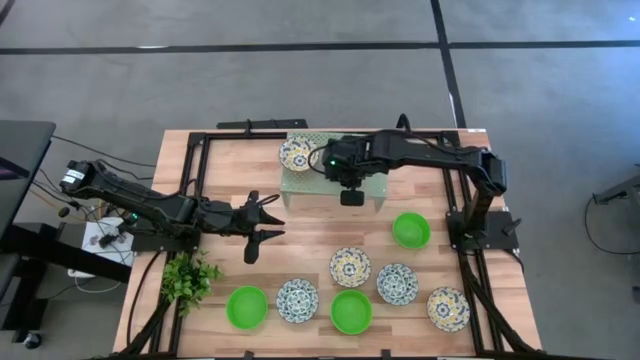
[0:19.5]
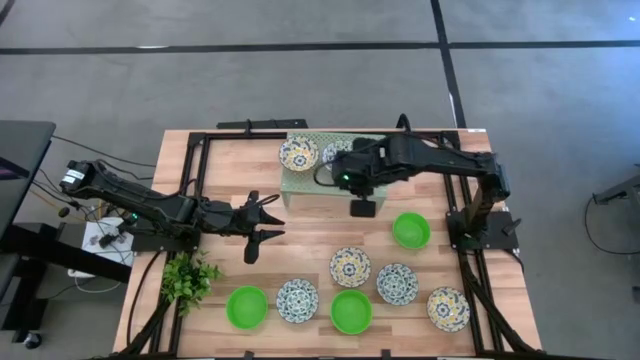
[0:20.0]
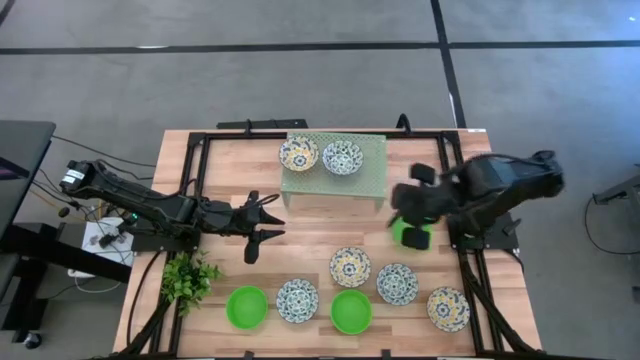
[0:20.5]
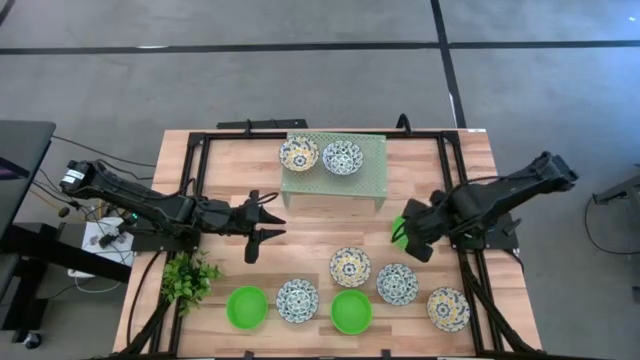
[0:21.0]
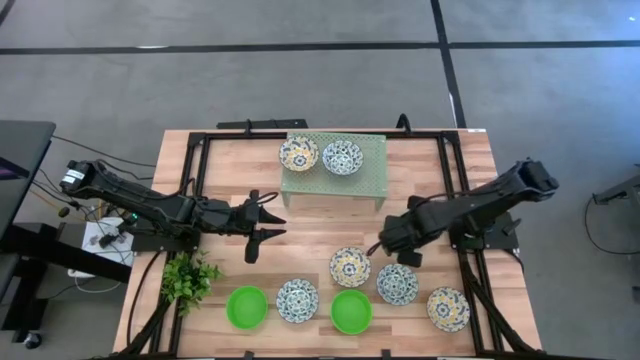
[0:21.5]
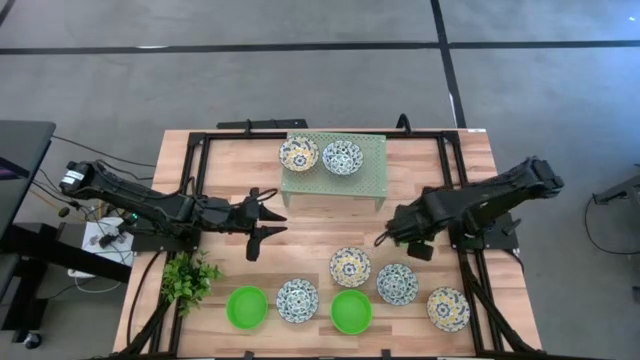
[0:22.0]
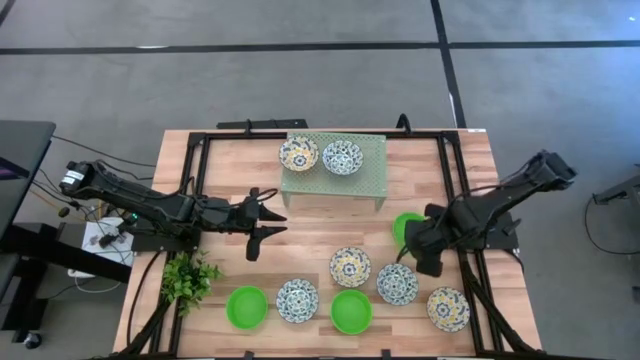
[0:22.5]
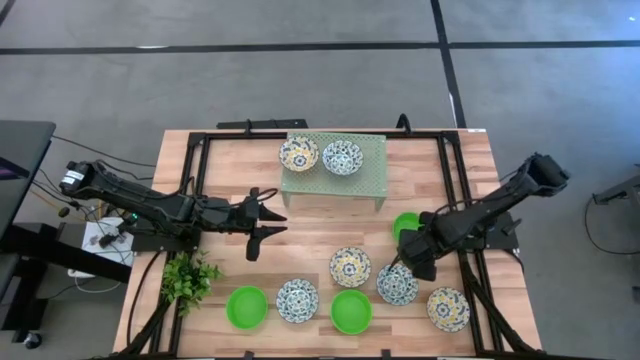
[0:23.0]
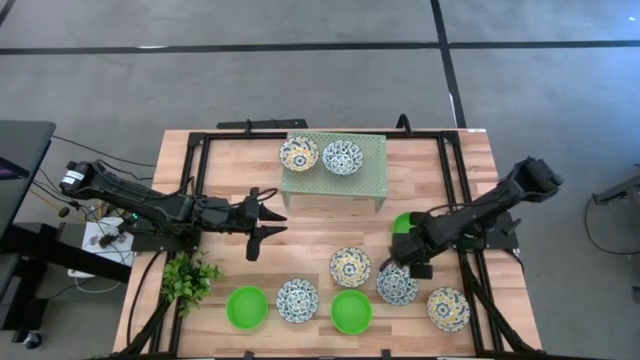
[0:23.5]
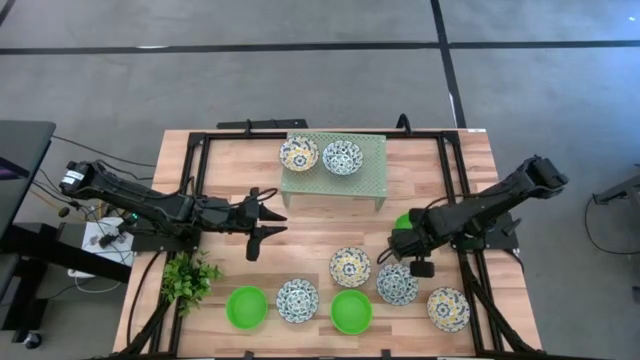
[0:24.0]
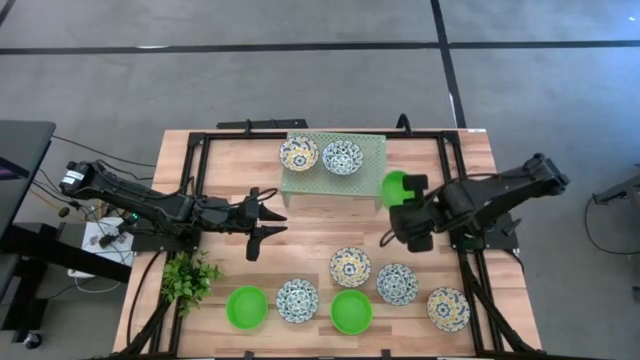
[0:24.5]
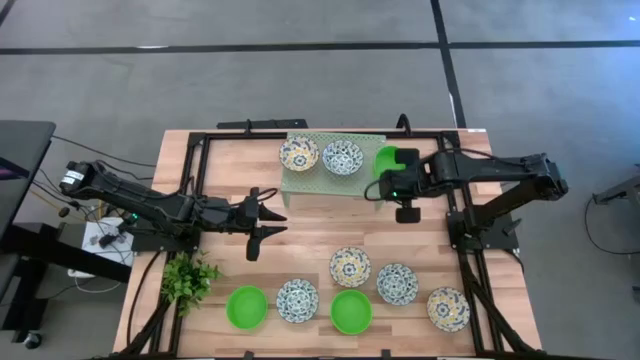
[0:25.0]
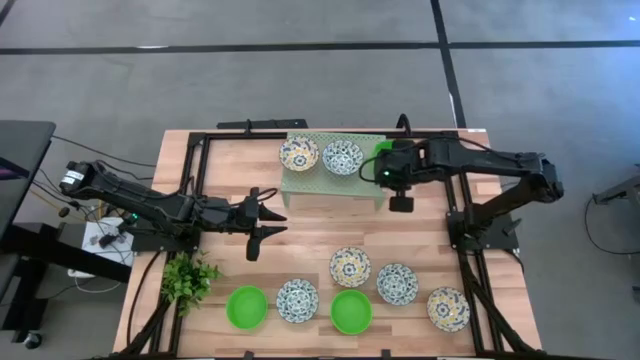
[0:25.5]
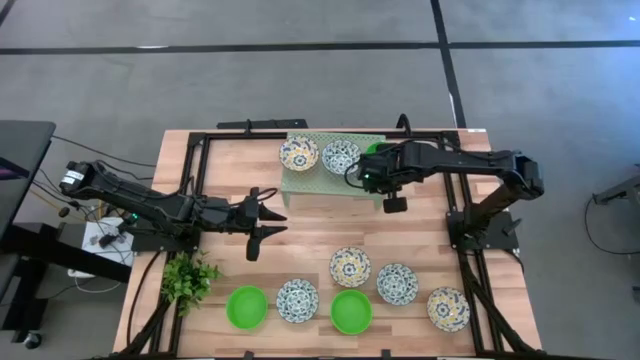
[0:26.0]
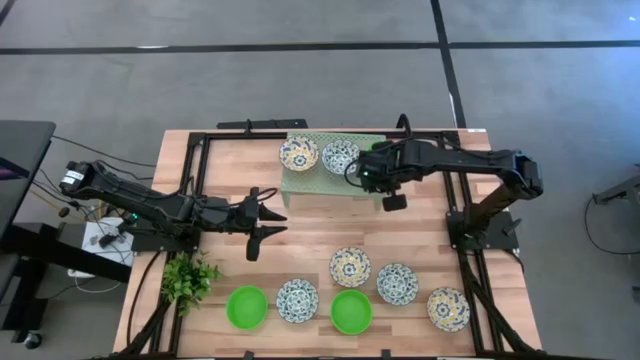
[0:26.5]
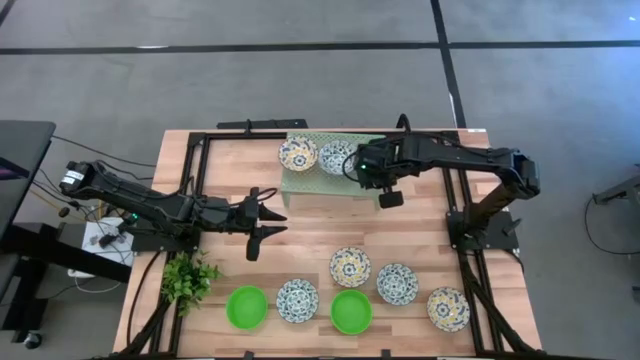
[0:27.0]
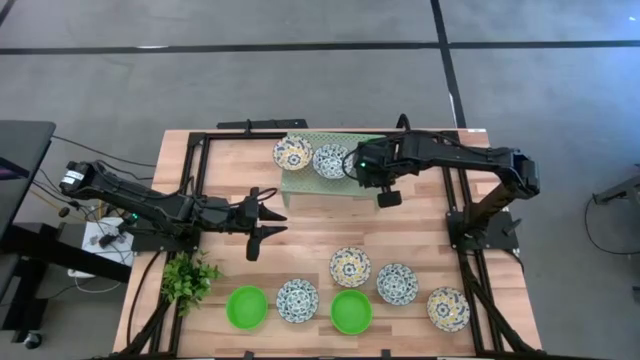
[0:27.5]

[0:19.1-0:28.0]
Task: Pick & Place Mini bowls
Put the top green bowl on the shelf

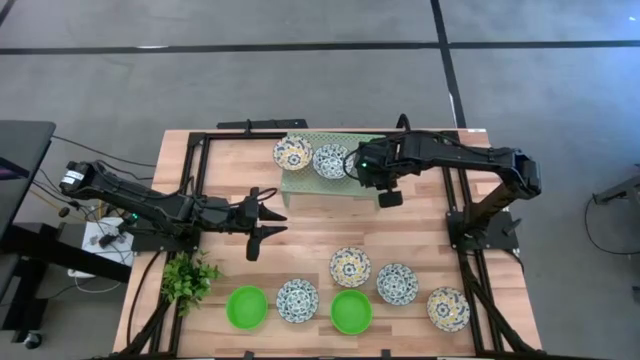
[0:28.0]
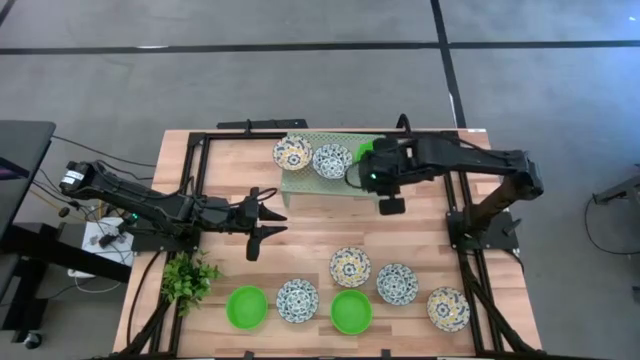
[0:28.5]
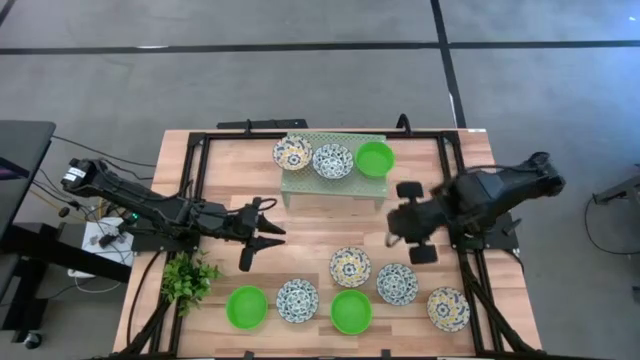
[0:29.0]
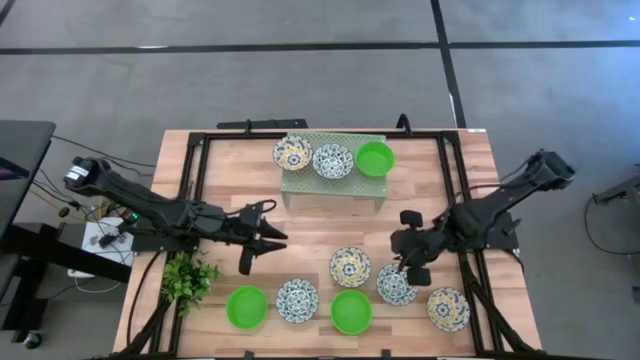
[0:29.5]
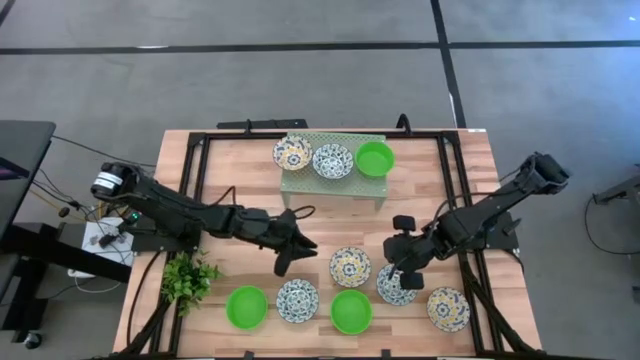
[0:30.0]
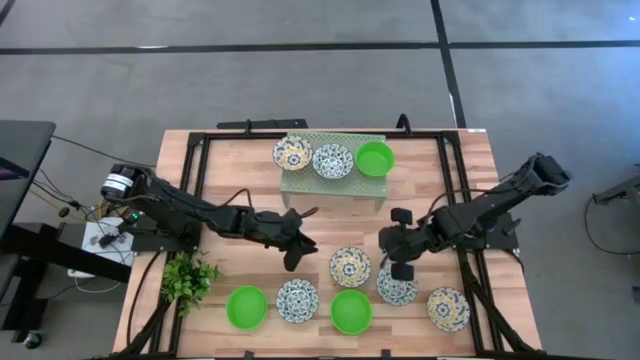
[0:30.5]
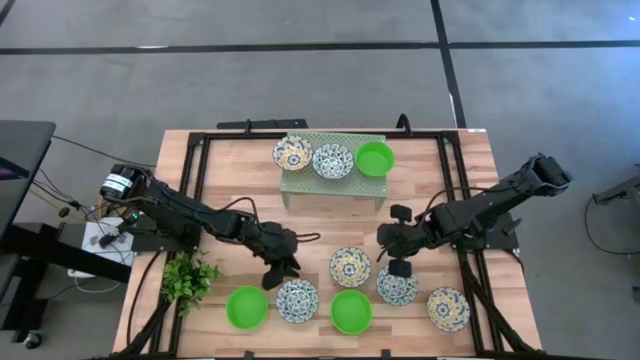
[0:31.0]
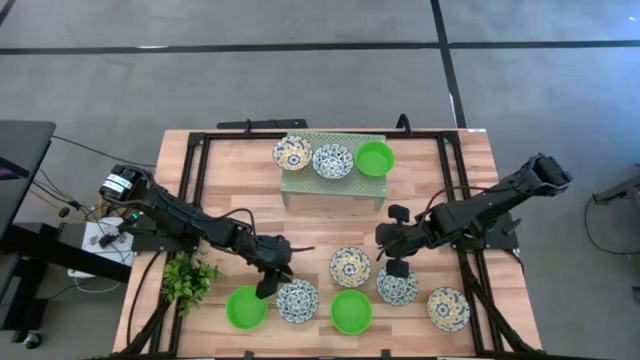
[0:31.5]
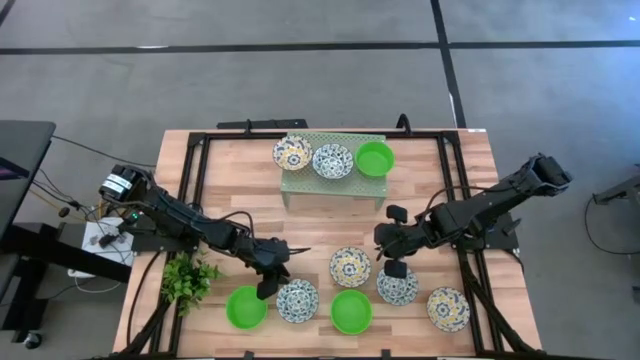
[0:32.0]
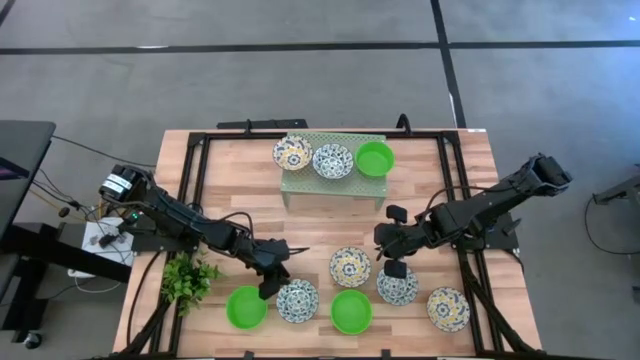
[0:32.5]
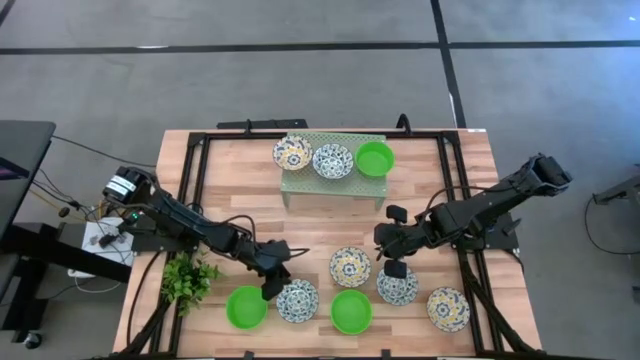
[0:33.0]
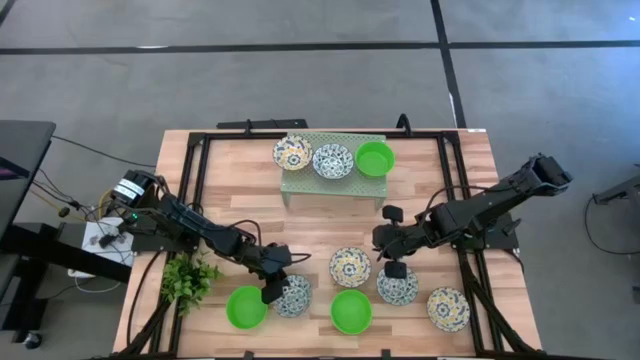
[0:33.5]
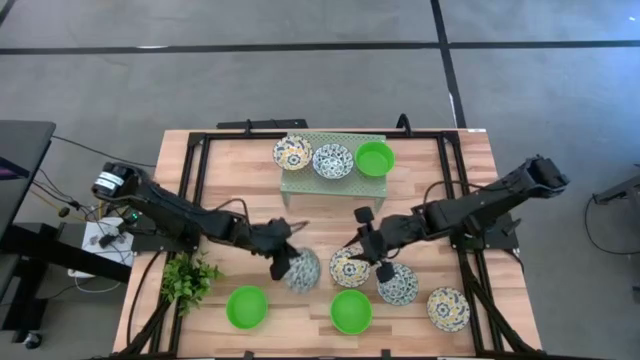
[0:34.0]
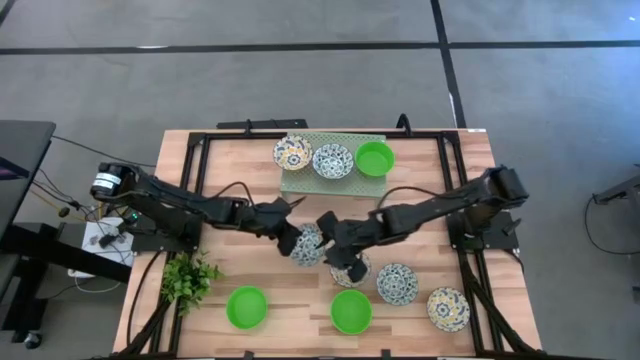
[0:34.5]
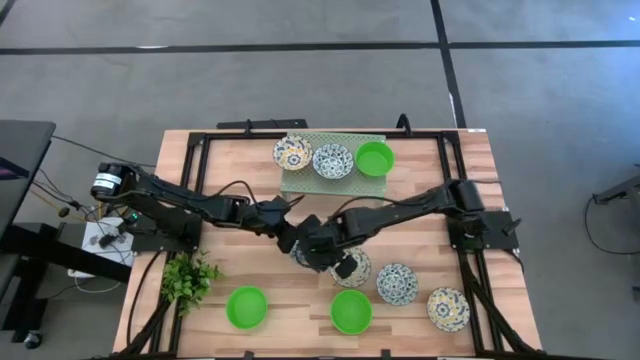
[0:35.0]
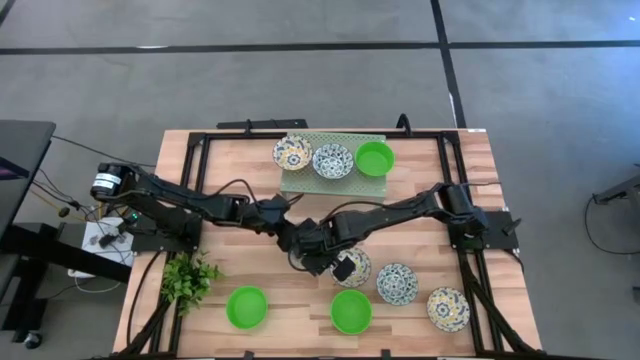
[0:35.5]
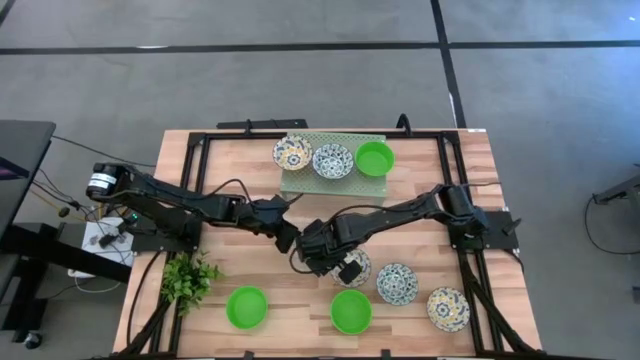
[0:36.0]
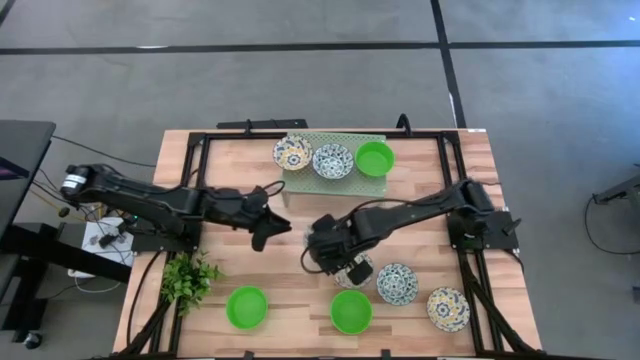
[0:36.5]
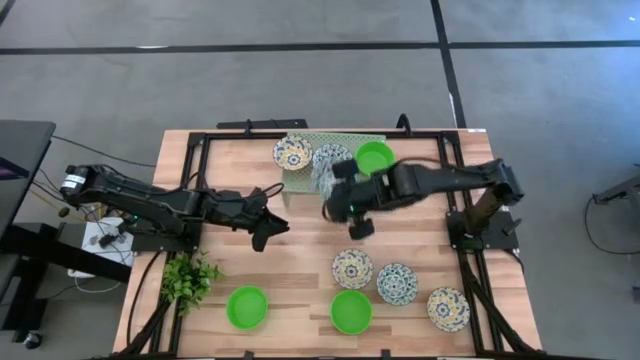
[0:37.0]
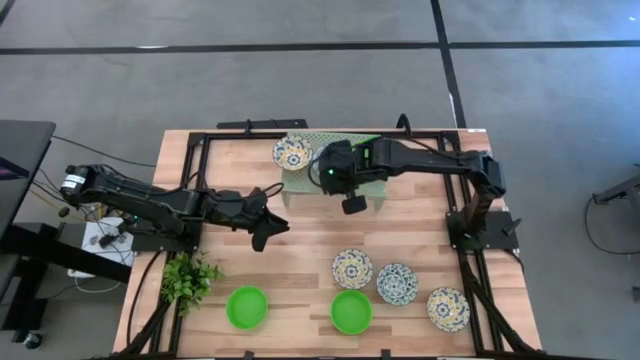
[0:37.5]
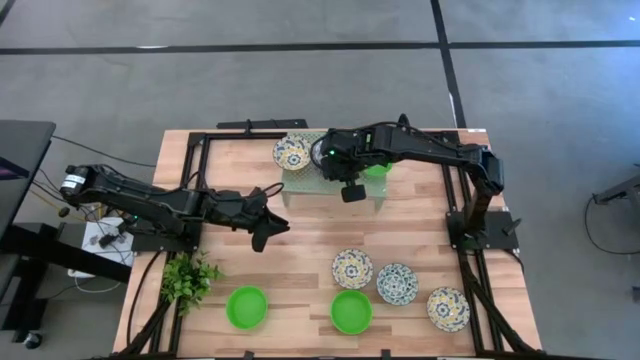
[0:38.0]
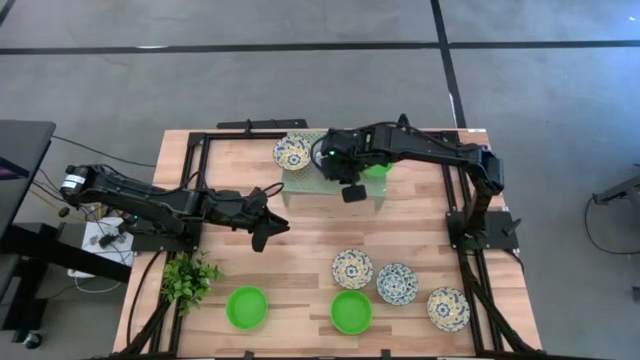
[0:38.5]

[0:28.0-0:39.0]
Stack the bottom blue patterned bowl on the blue patterned bowl on the shelf

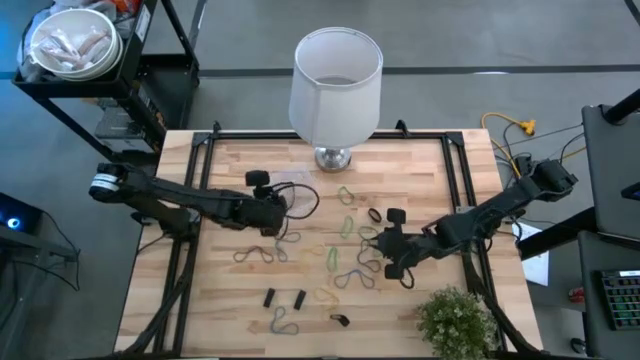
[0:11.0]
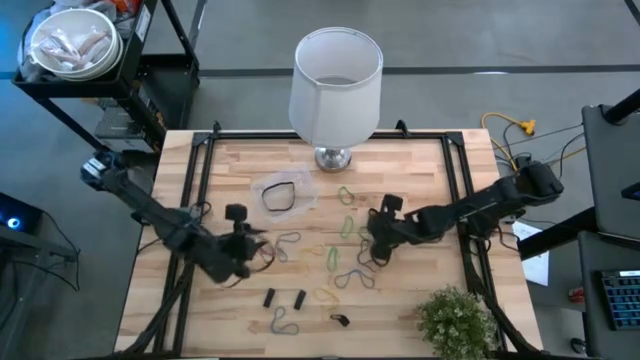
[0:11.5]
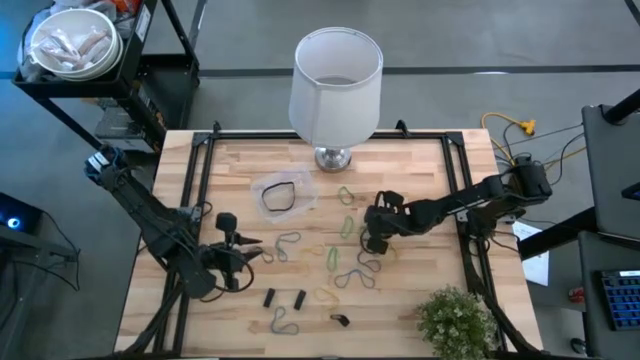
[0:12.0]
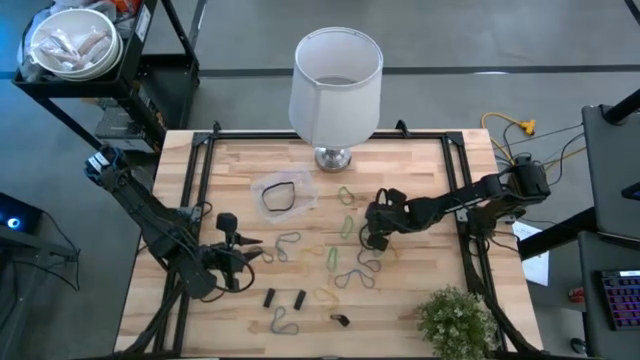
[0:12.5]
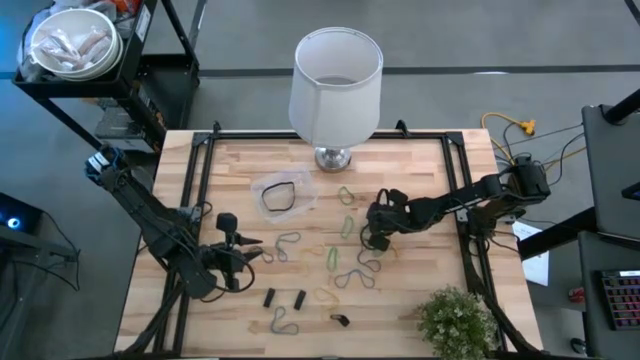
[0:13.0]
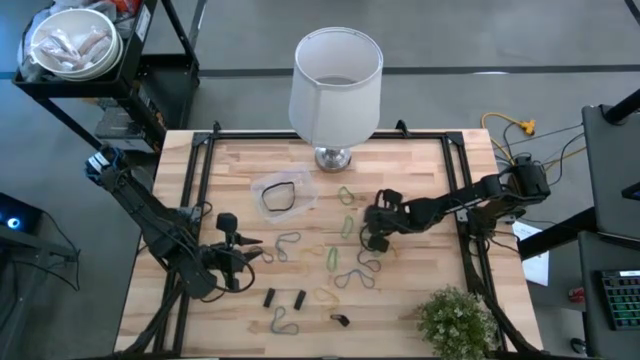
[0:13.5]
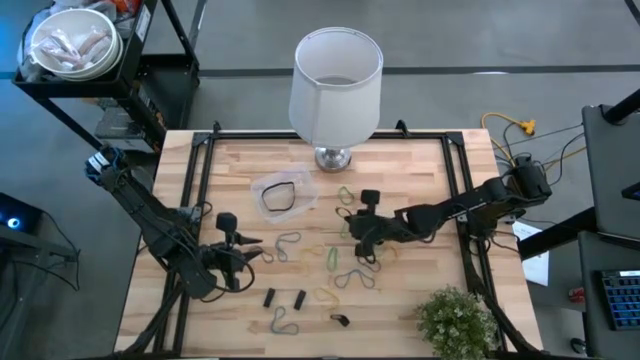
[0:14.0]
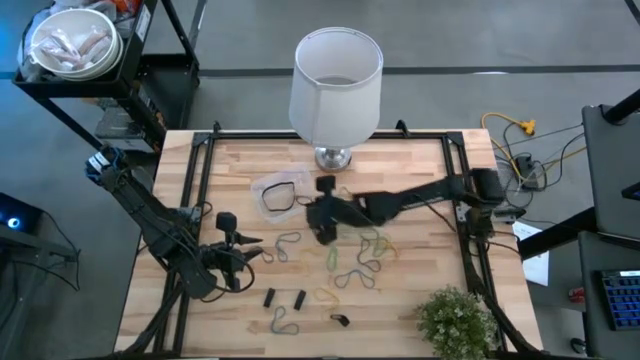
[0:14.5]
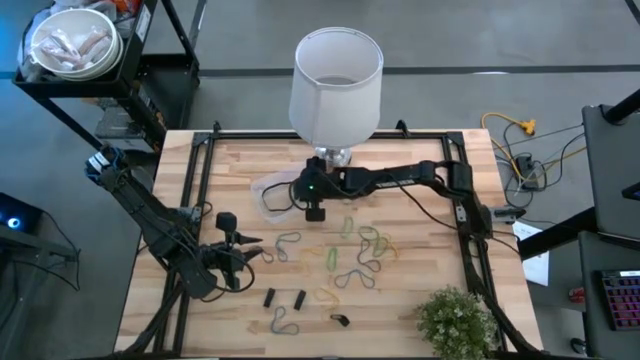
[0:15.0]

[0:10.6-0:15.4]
Task: Pick and place rubber bands into bin
Put the black rubber band into the transparent bin
